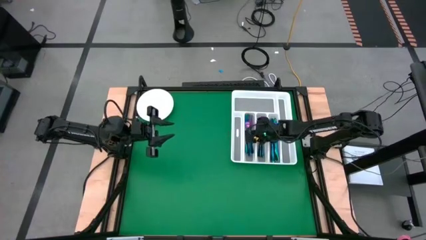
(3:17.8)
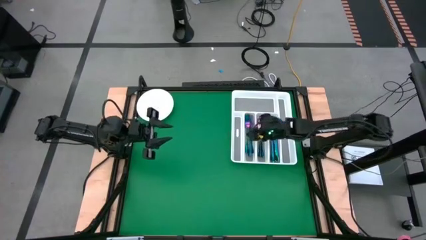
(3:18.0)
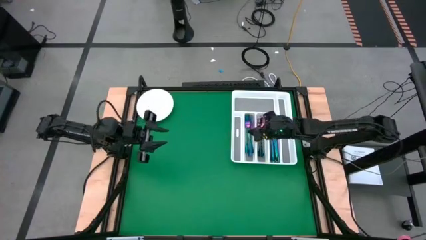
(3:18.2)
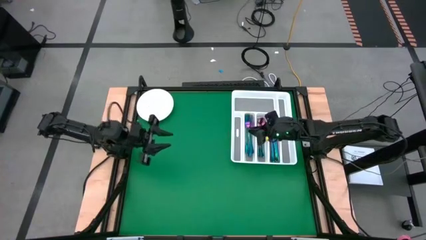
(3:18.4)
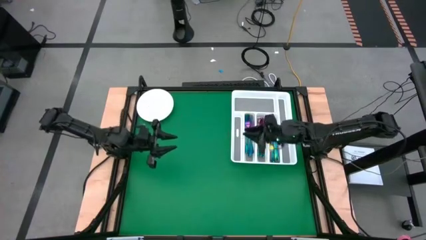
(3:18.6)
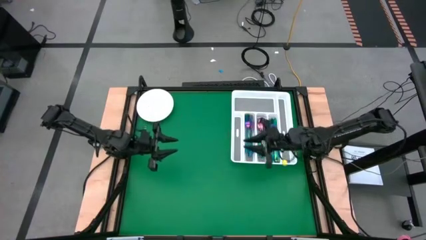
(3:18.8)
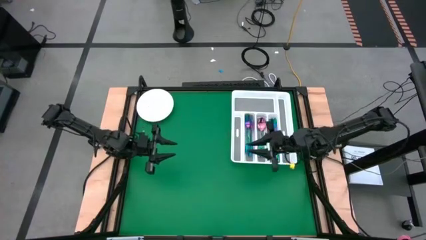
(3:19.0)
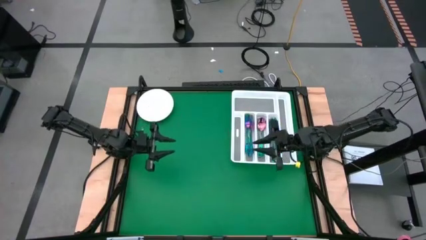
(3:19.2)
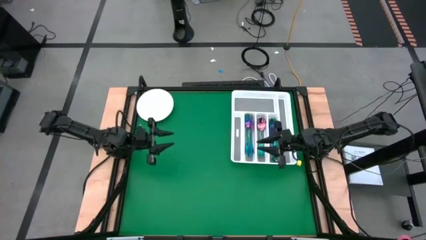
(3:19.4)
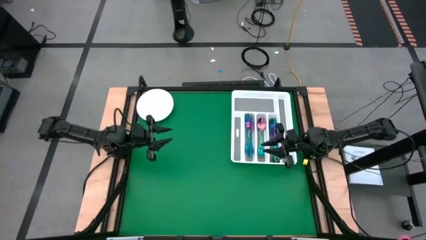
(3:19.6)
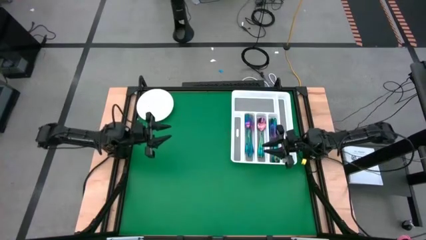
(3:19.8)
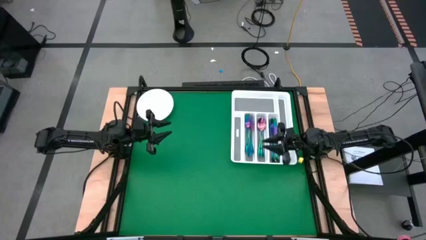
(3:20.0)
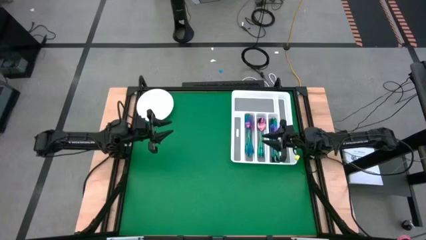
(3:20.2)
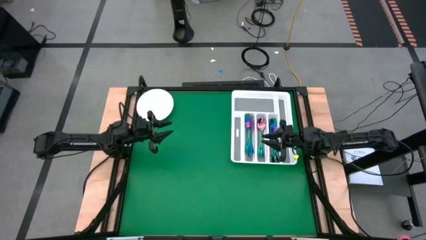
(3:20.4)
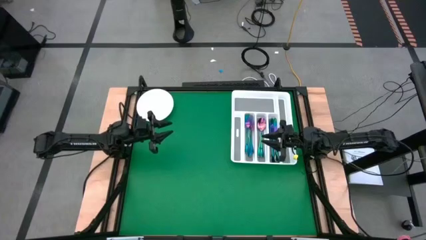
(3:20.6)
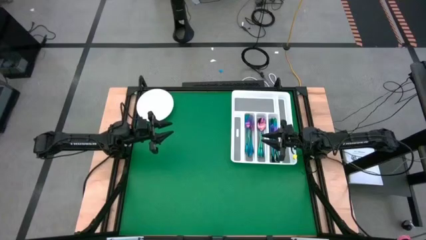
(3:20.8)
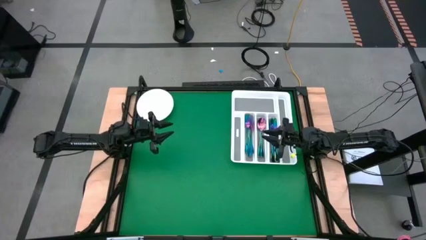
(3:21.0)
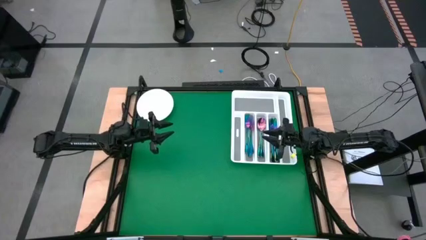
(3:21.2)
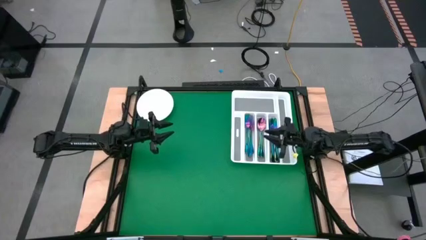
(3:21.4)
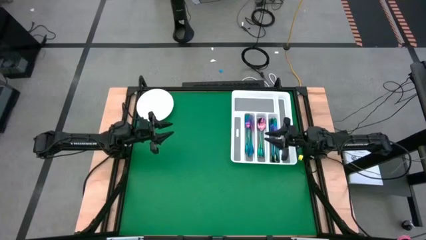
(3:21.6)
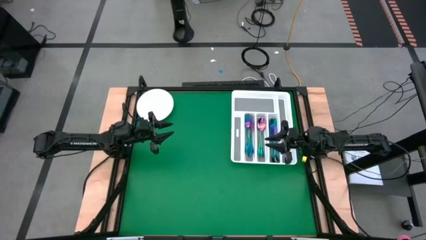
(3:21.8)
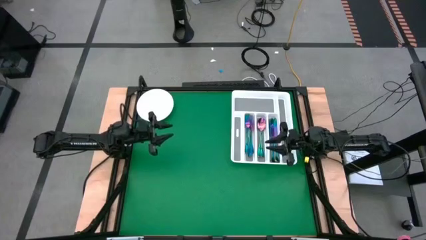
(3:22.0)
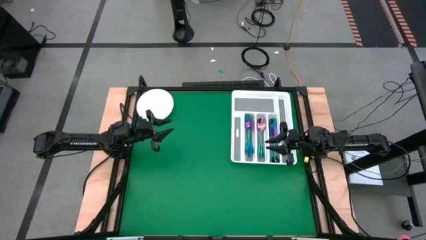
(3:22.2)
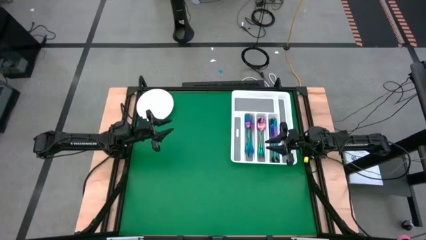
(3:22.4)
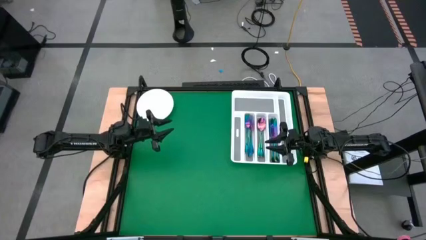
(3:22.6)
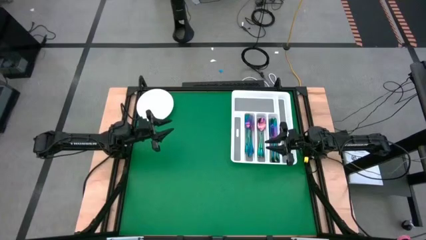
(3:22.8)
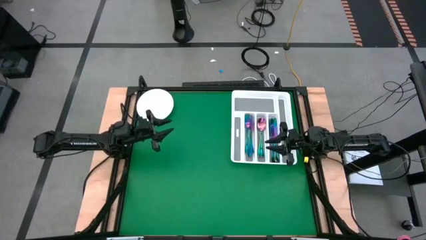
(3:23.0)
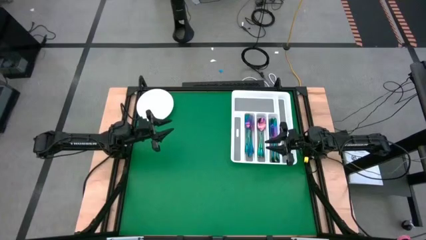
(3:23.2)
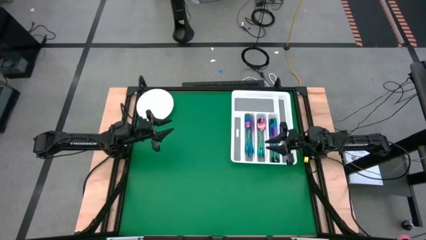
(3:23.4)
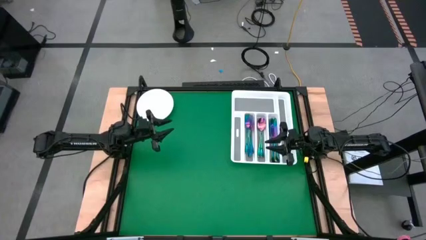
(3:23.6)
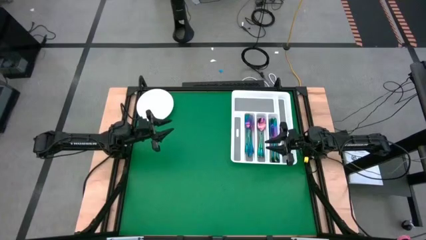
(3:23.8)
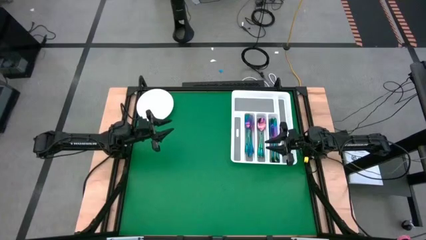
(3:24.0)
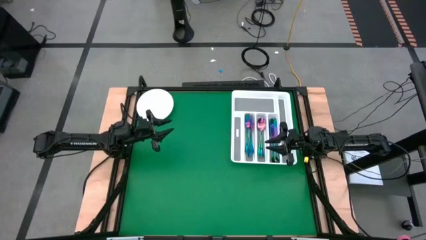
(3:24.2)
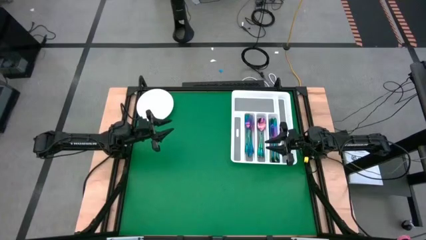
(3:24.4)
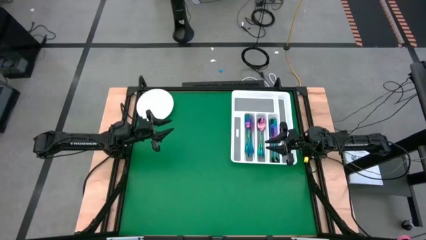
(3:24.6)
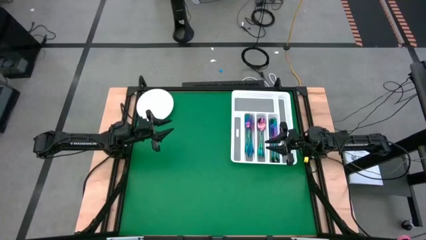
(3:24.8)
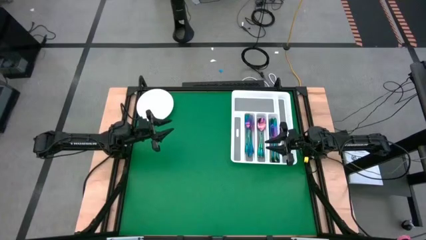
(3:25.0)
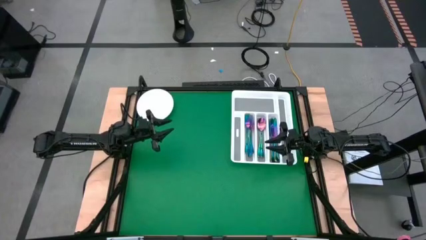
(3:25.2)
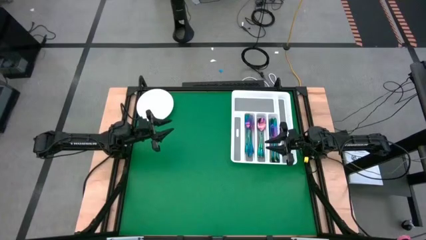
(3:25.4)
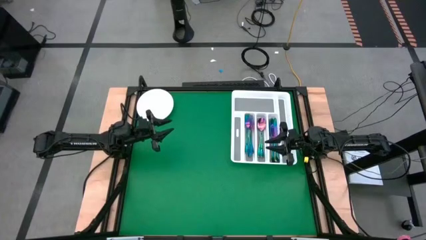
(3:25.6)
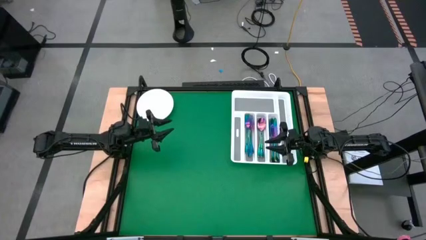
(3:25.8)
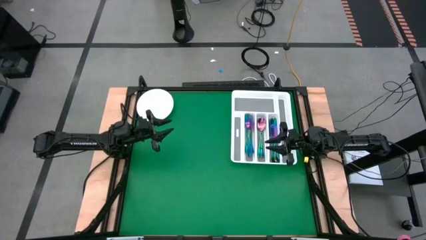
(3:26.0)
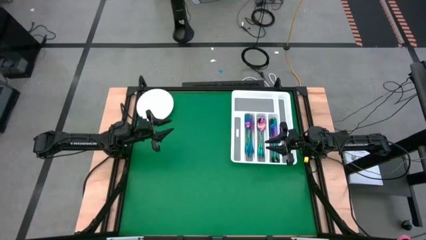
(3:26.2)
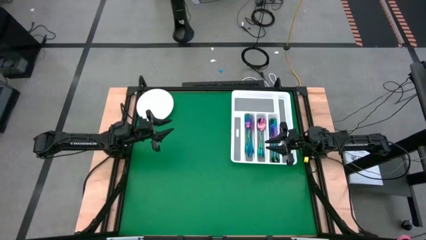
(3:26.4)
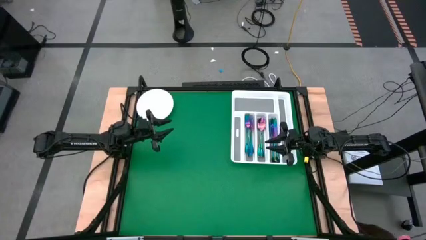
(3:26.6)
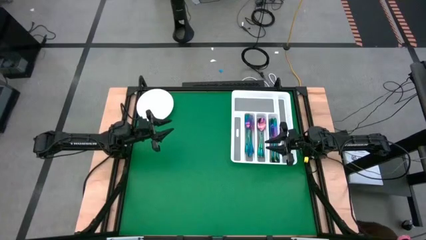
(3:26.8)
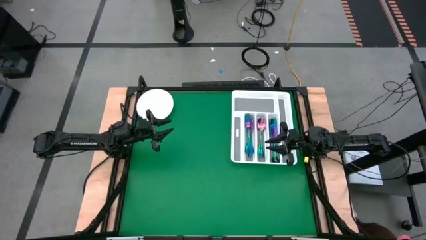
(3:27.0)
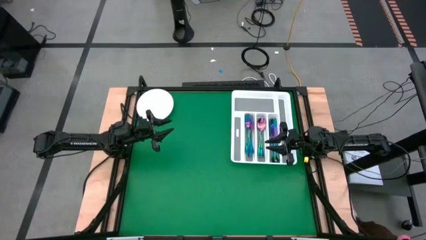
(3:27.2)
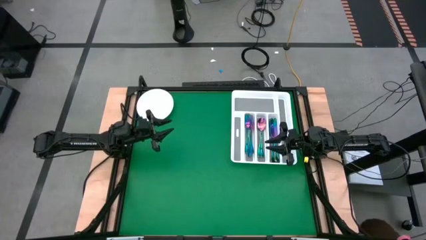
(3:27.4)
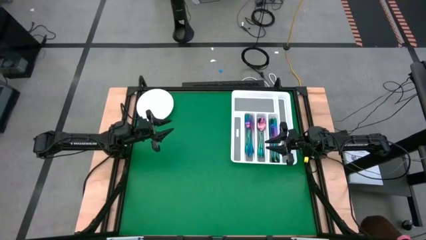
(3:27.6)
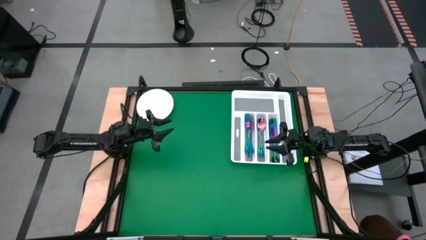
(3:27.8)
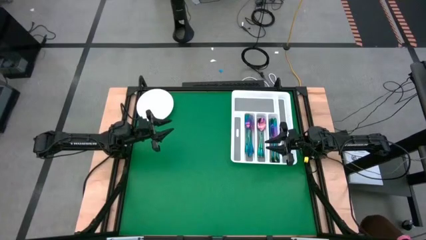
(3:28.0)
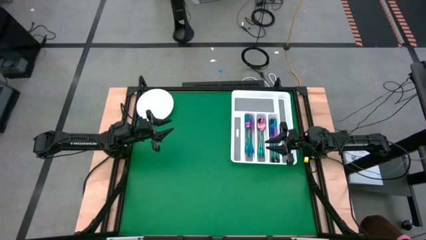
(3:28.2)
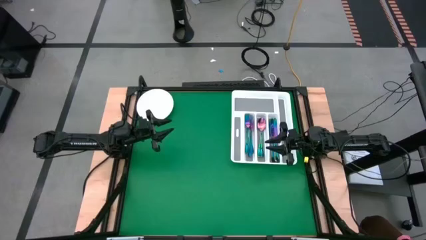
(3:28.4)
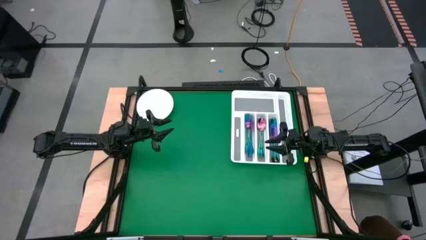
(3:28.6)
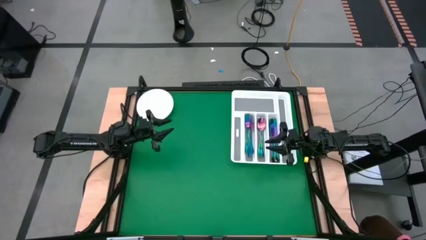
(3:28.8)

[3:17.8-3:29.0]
Task: Sort silverware
Return to Home Position

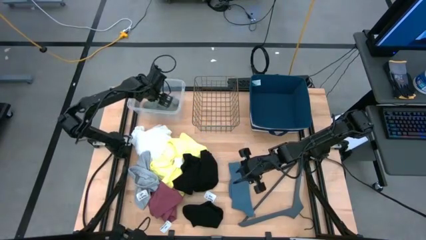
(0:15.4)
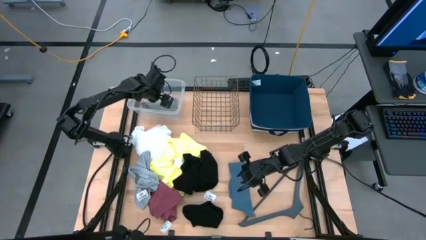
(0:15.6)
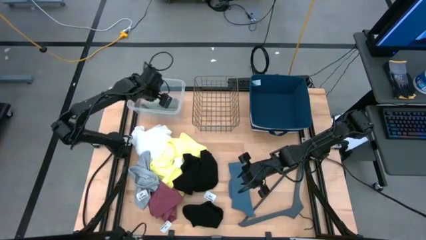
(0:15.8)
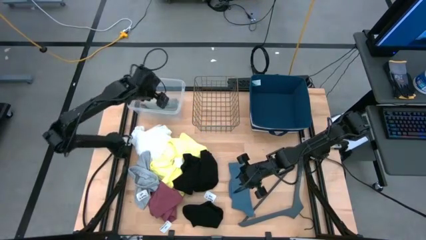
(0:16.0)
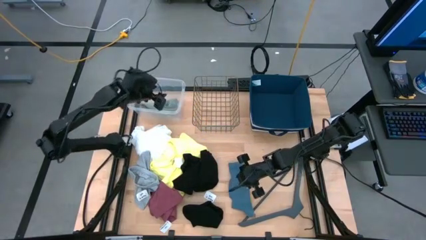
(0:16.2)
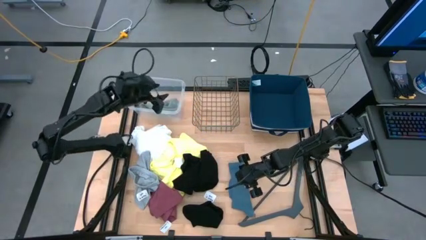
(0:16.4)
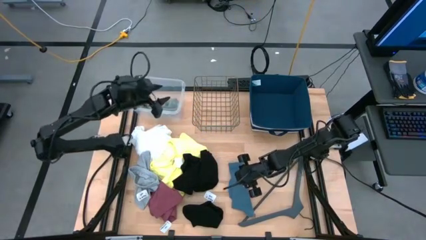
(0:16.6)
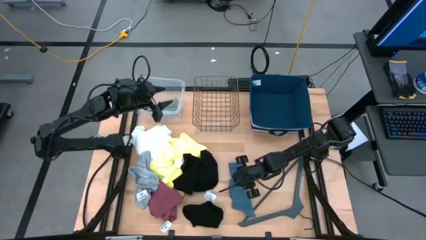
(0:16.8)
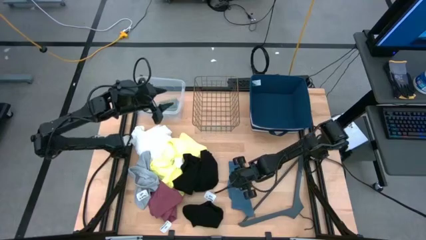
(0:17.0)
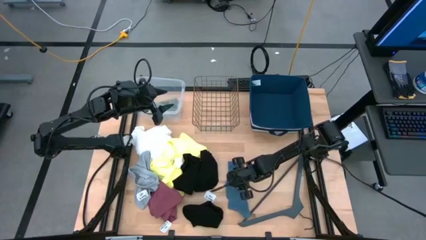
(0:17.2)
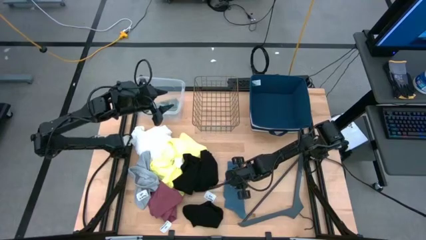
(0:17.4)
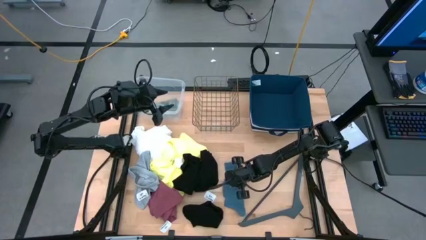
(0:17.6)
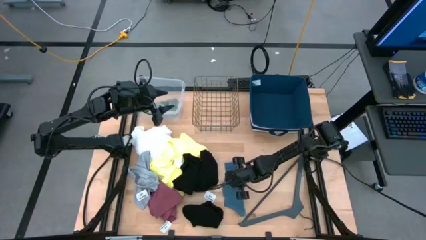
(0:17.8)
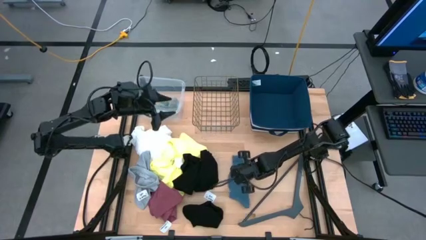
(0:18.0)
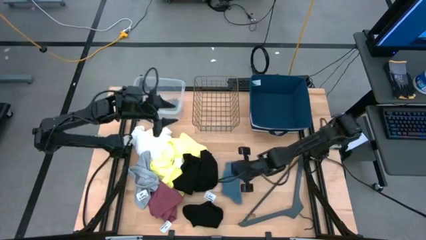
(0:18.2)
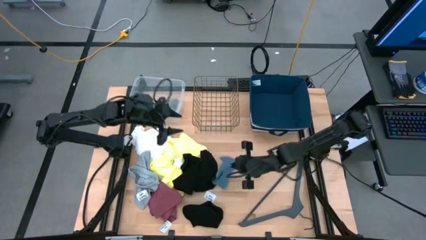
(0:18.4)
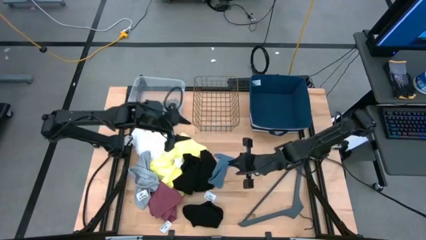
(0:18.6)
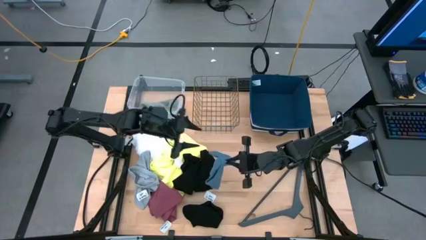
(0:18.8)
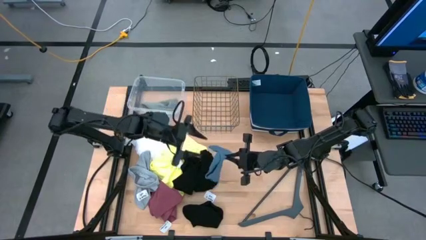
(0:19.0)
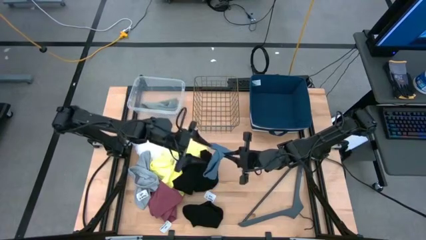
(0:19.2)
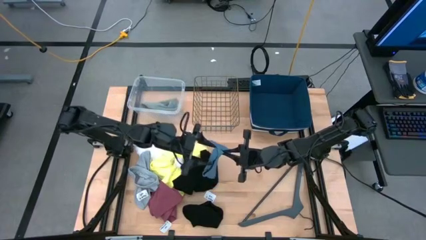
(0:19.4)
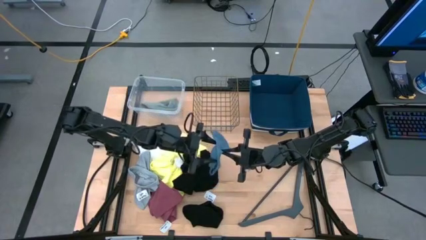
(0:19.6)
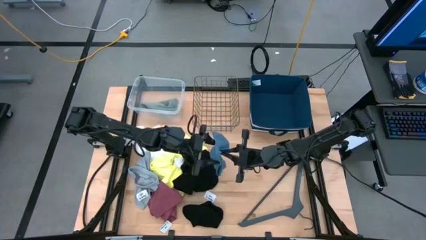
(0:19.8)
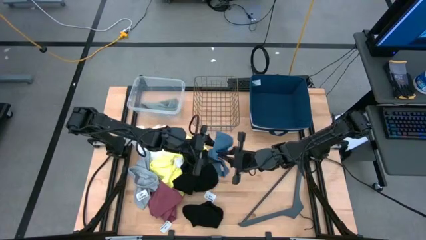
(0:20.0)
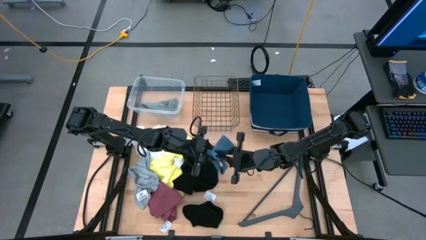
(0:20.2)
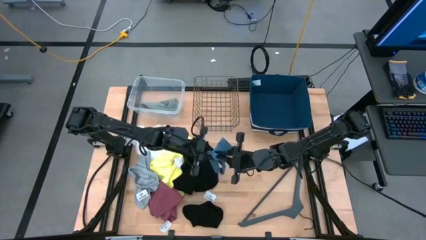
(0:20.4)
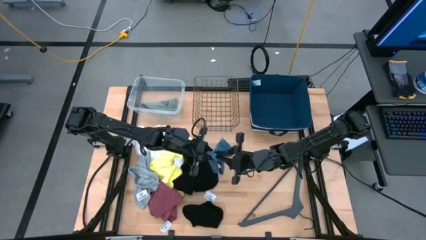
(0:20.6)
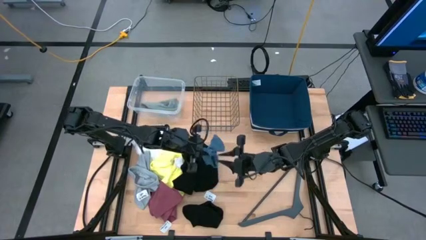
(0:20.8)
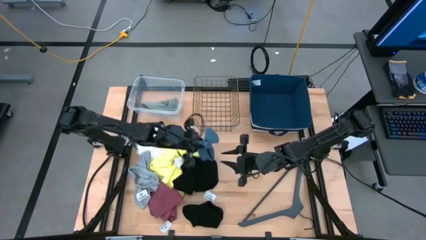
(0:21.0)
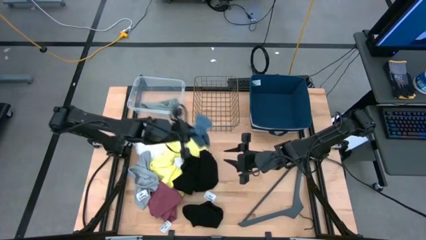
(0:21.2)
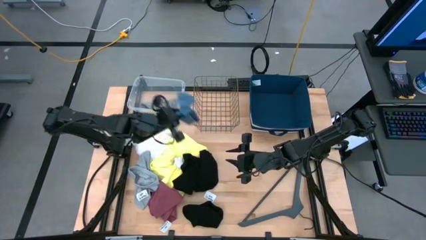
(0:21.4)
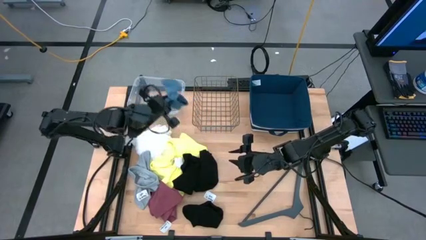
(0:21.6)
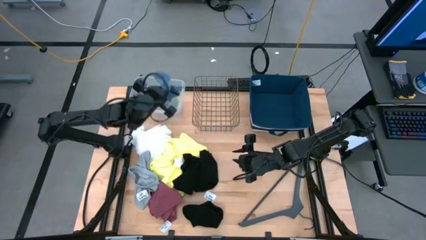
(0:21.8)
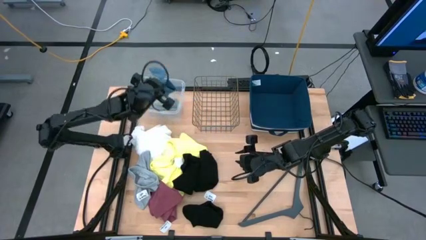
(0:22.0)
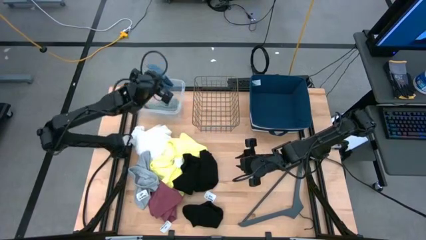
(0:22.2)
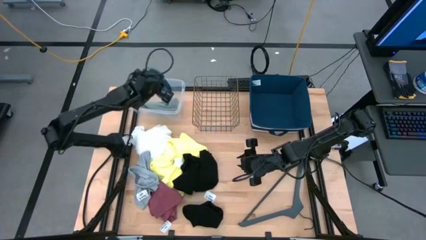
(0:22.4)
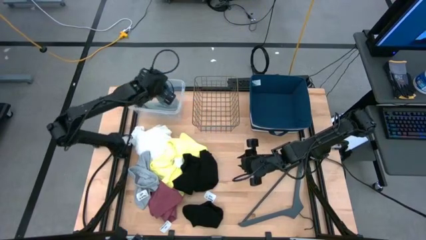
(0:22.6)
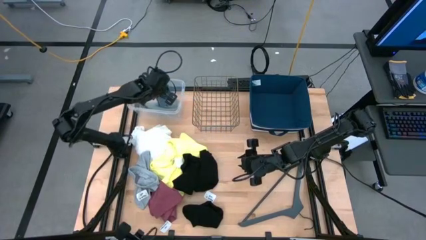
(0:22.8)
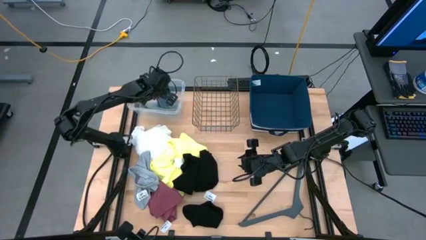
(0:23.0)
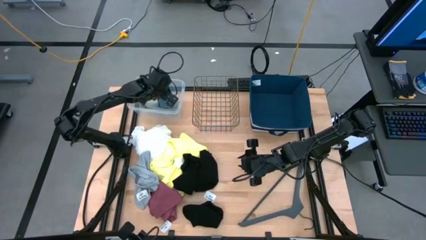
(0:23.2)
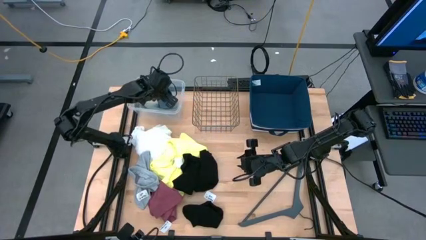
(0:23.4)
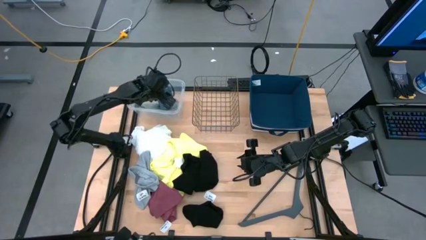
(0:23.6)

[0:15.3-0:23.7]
Task: Pick & Place Cloths
Put the blue sock into the transparent container
